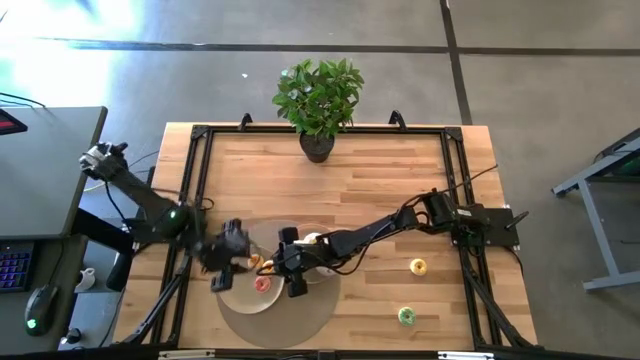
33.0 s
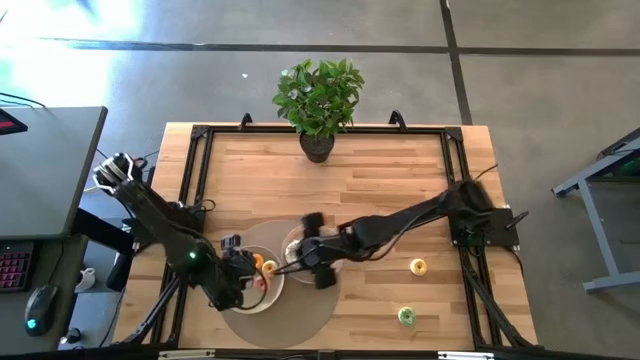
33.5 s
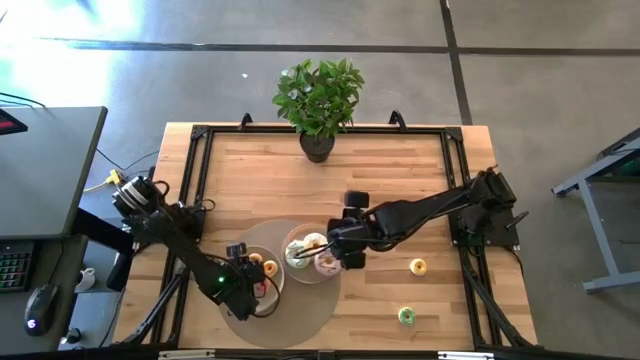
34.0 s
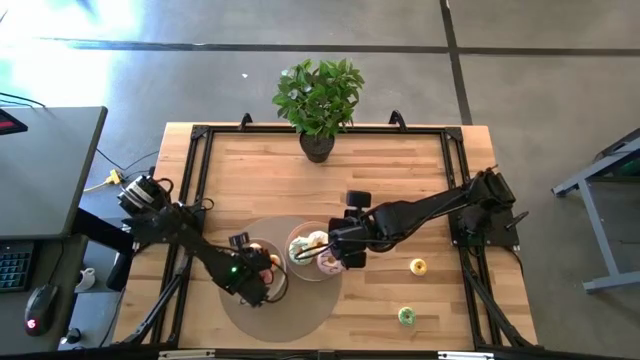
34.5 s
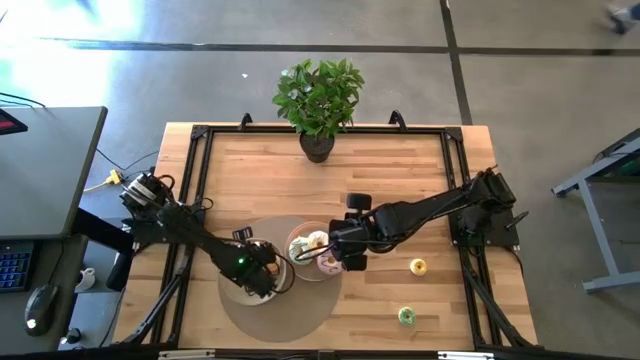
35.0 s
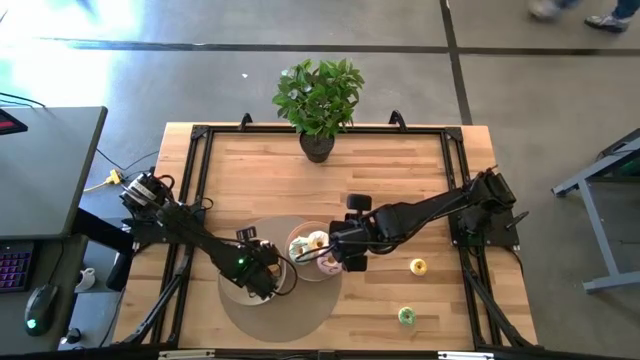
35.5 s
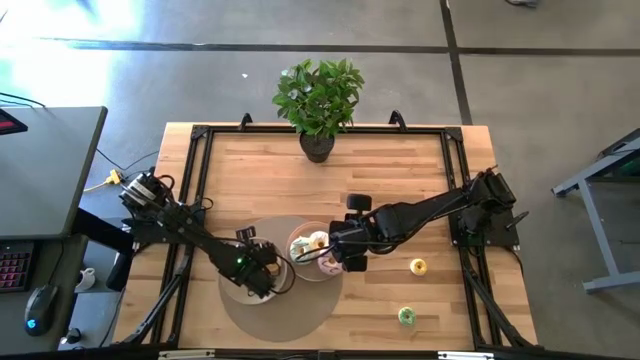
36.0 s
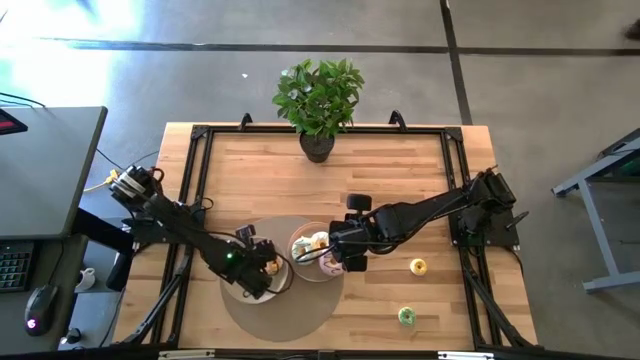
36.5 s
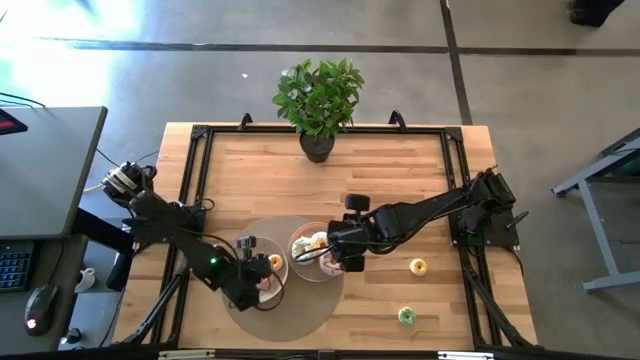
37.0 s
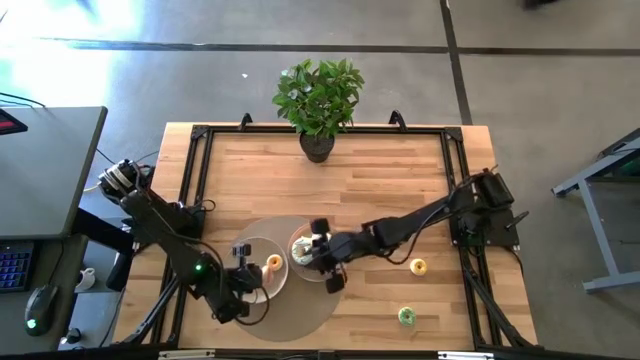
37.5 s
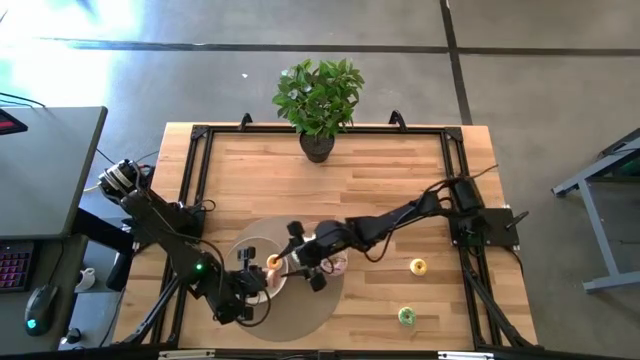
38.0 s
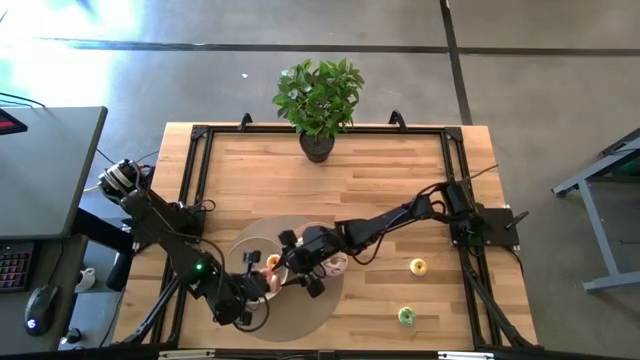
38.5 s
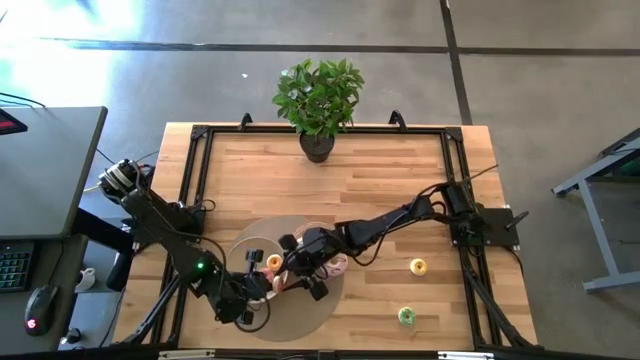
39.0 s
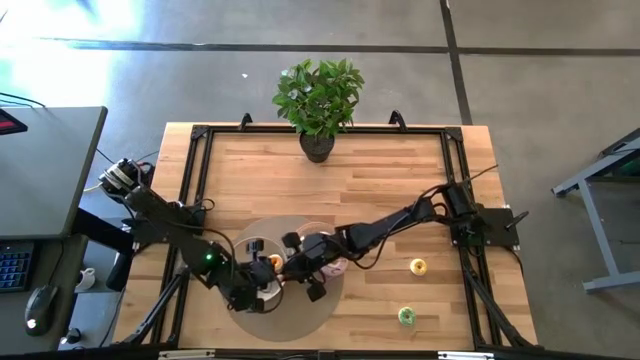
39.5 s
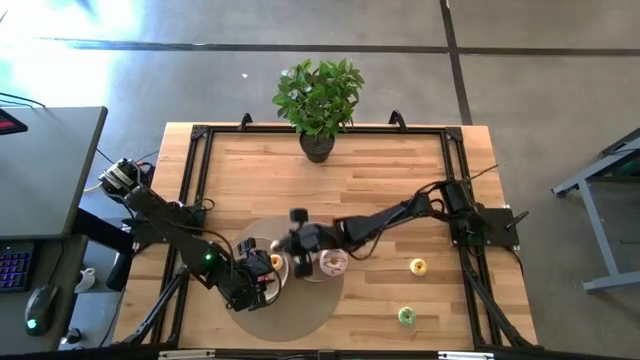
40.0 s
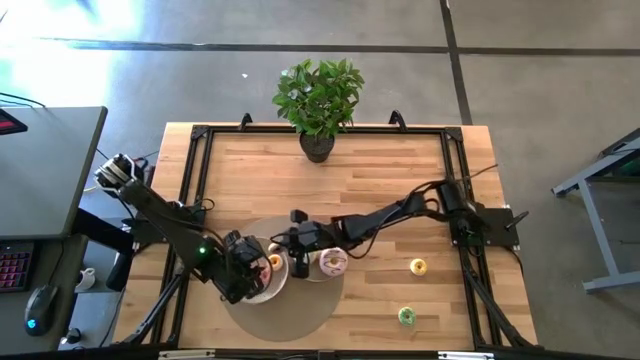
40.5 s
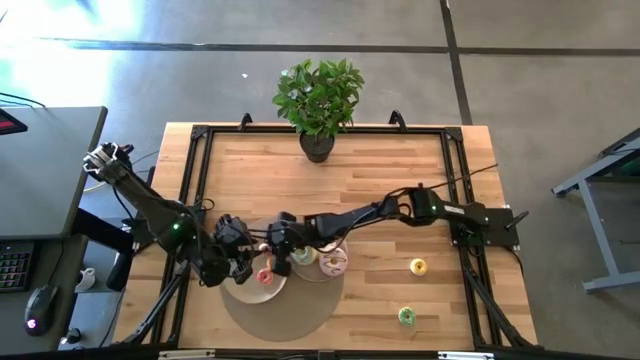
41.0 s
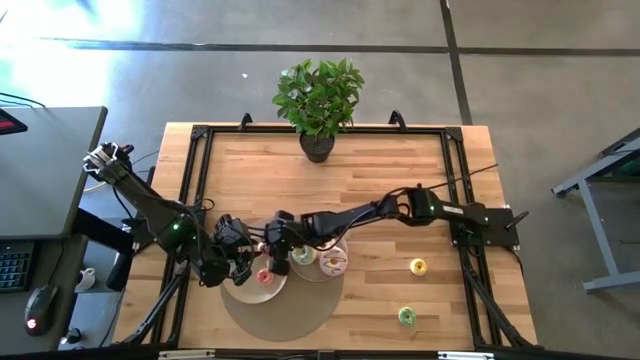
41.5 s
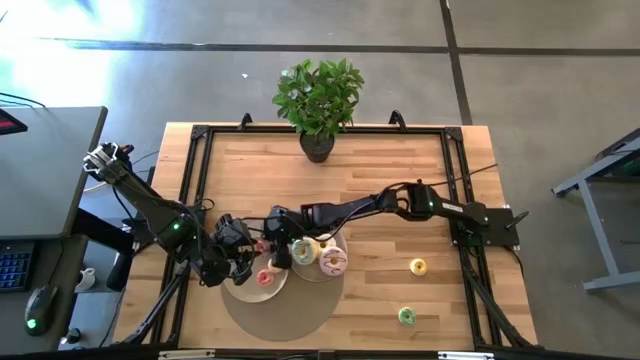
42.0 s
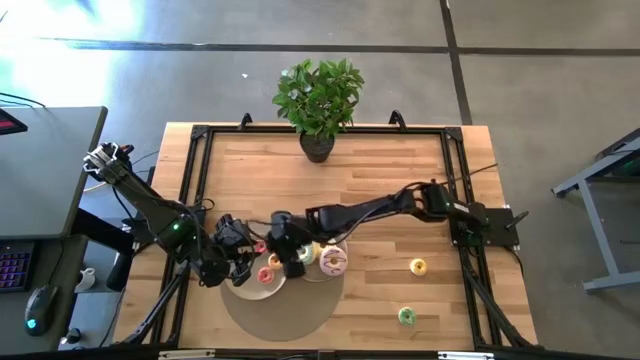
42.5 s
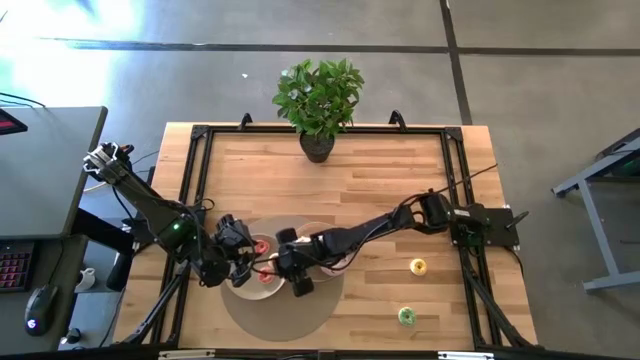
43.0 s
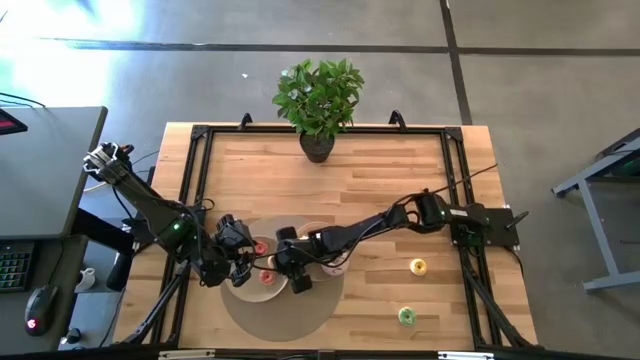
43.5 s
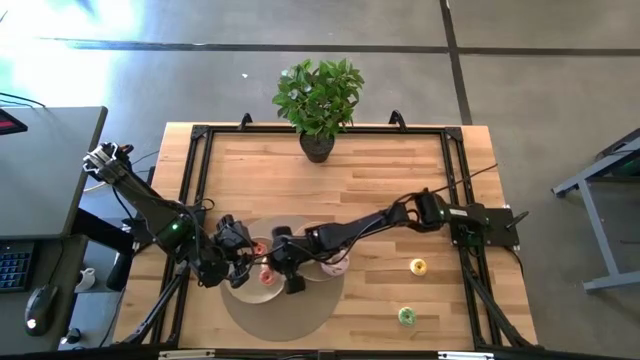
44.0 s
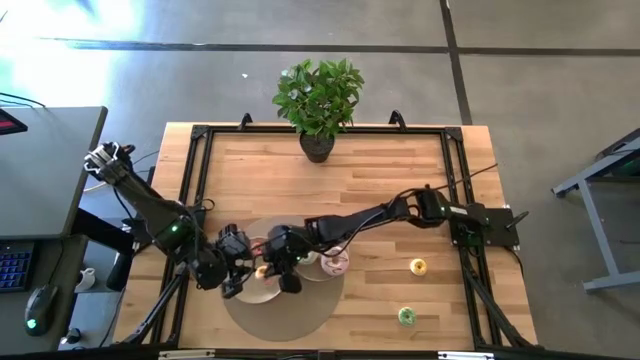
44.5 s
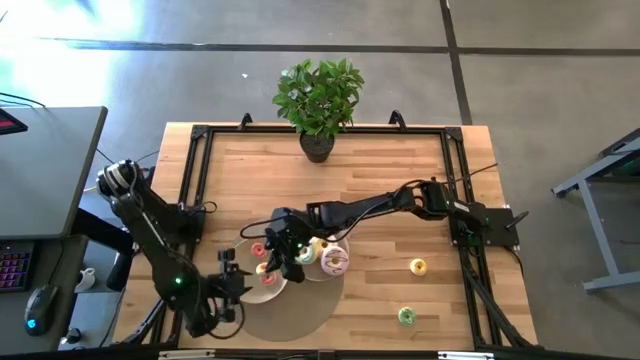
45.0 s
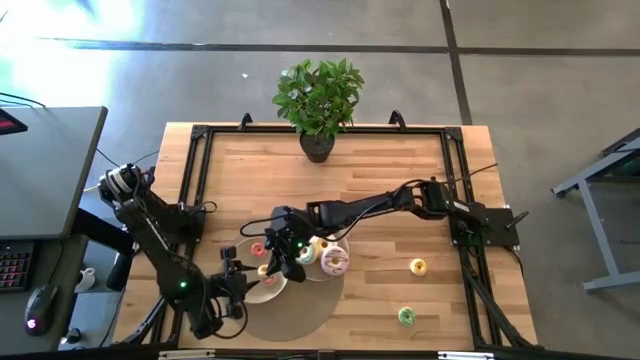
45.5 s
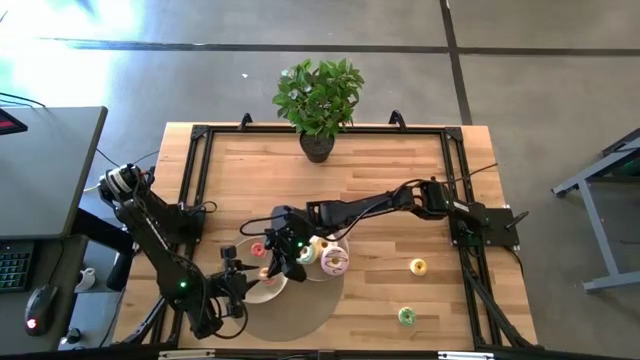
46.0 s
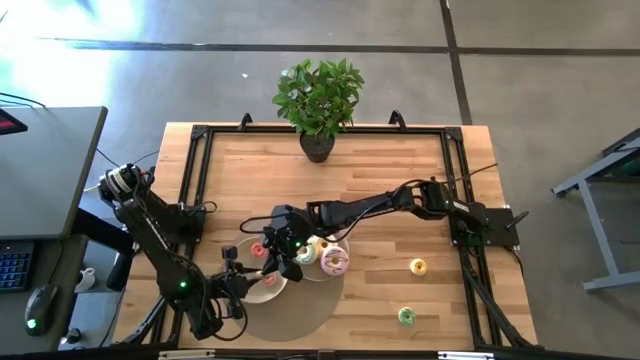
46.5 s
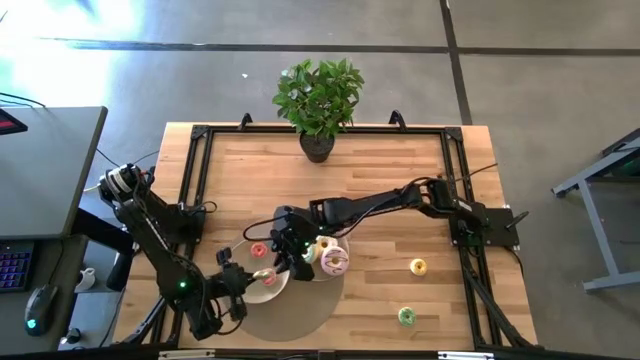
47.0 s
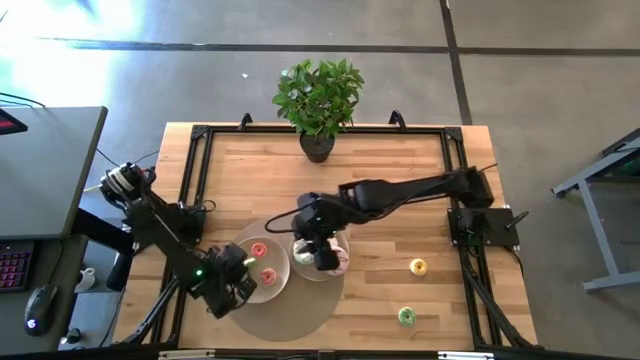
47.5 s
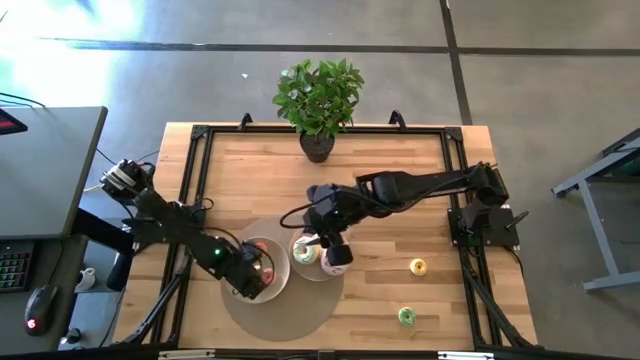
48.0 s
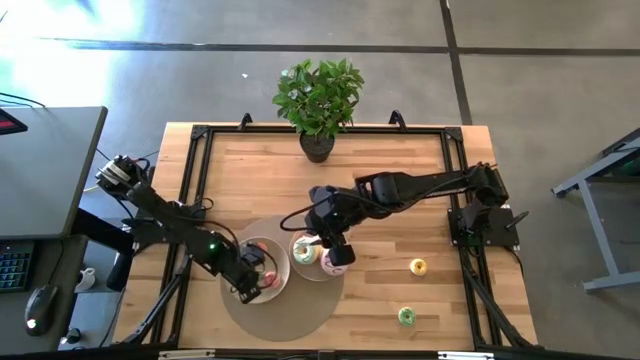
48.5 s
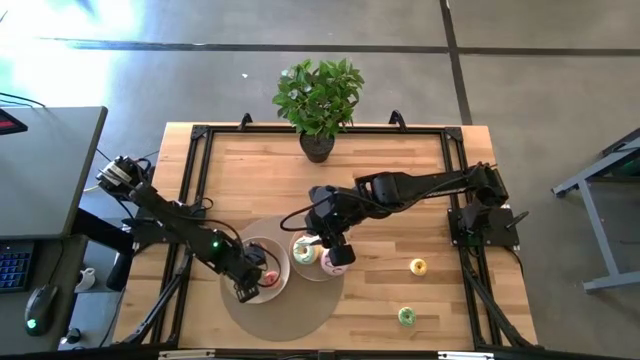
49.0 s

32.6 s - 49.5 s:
Task: Pick & Place donuts
Adjust the small pink and green donuts

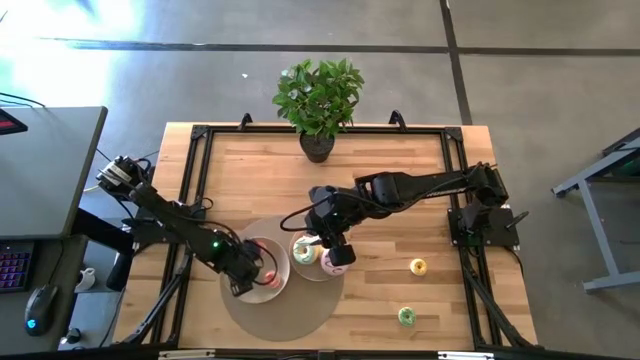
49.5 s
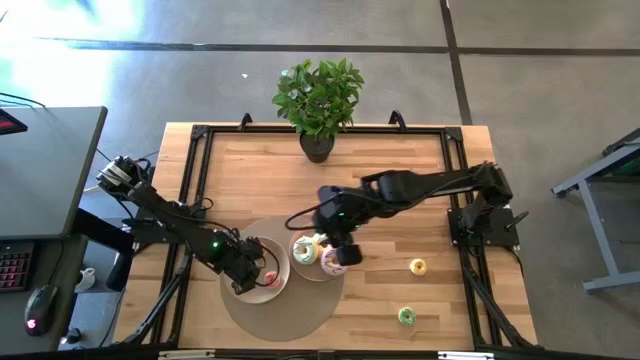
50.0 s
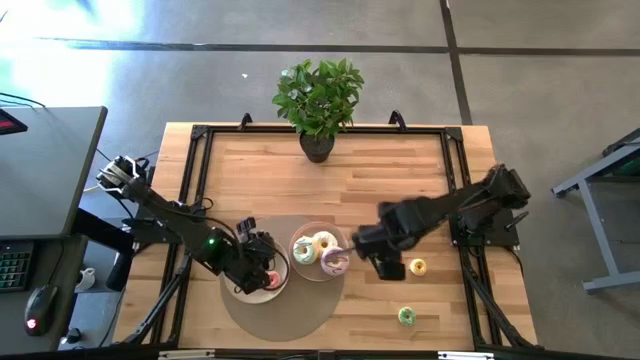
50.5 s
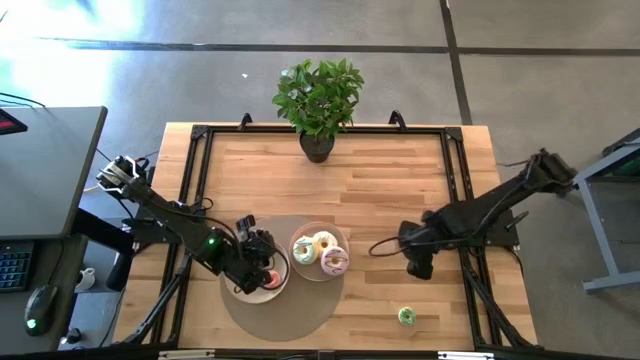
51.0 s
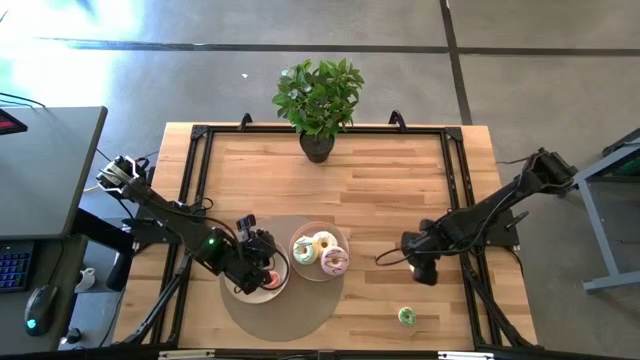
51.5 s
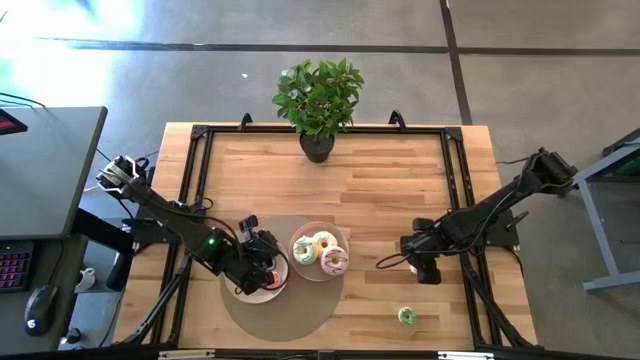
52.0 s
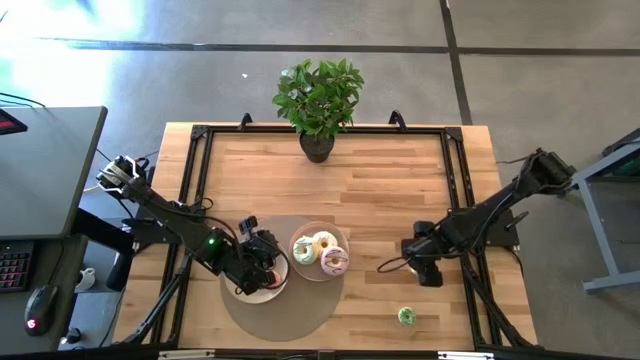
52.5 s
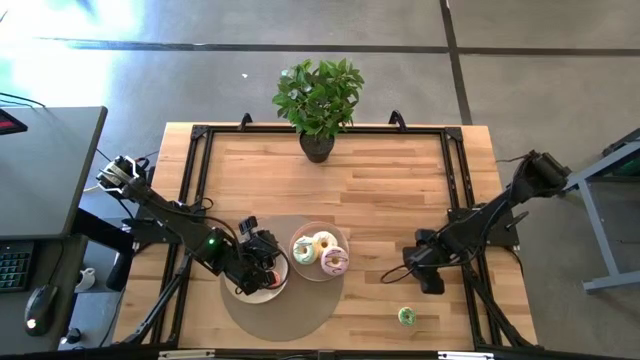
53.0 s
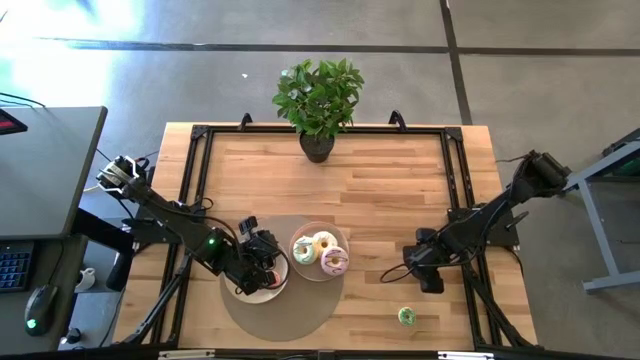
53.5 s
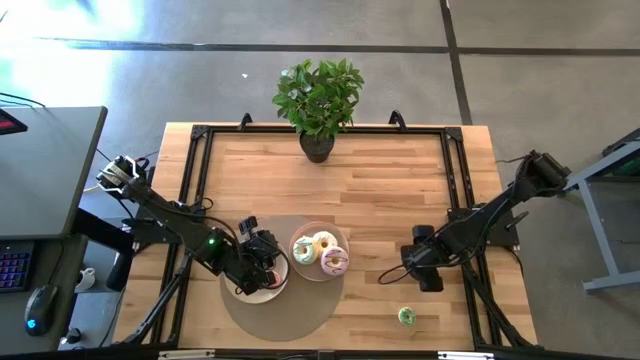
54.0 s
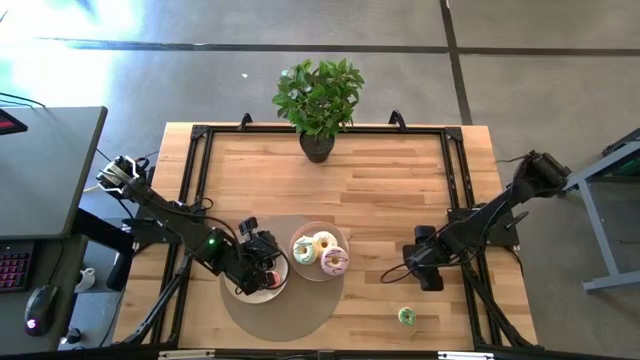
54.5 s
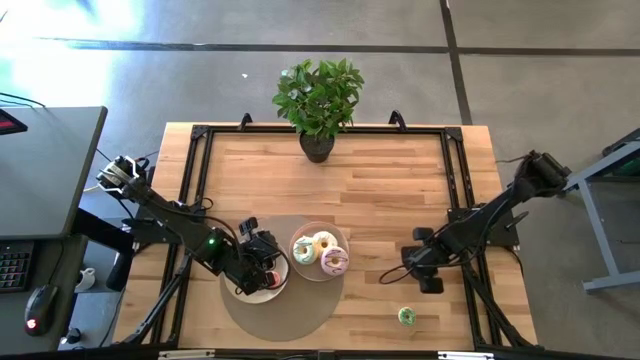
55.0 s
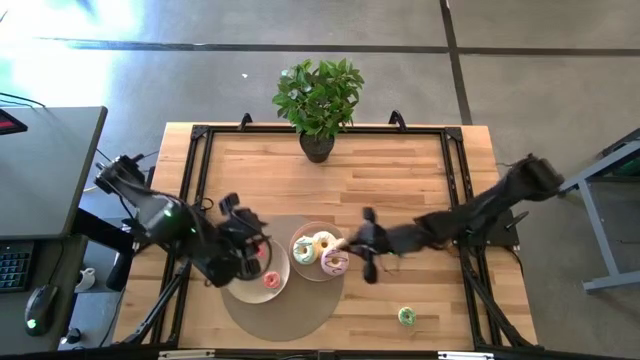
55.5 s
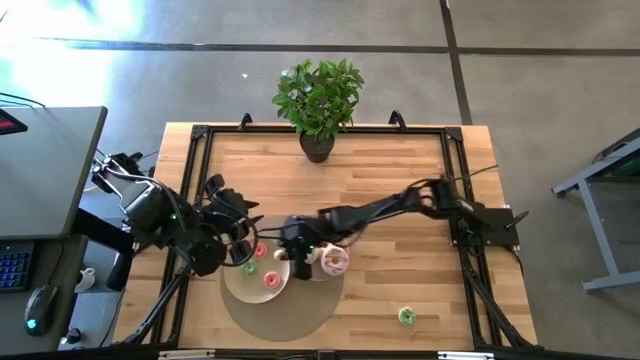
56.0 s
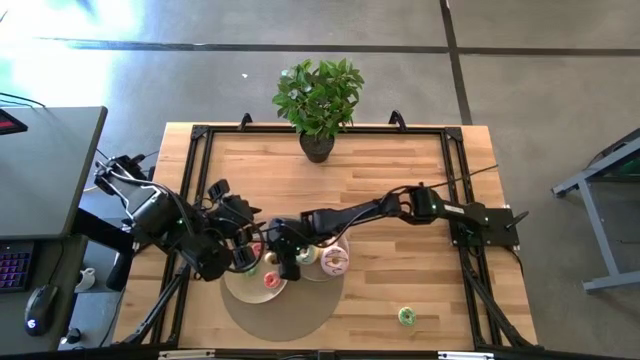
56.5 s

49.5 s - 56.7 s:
Put the small yellow donut on the left white plate
